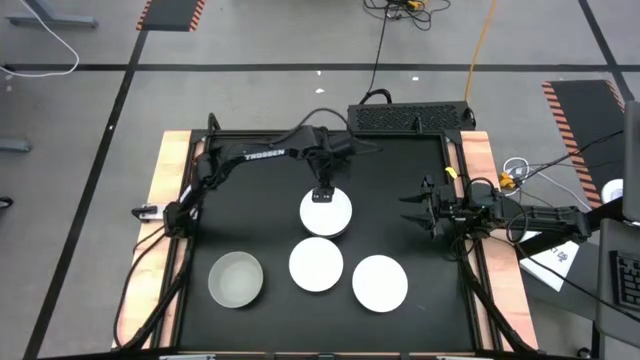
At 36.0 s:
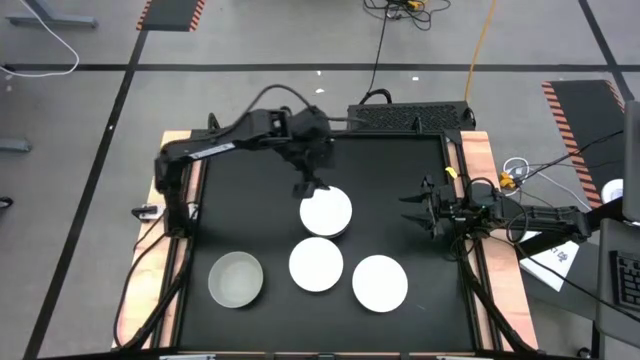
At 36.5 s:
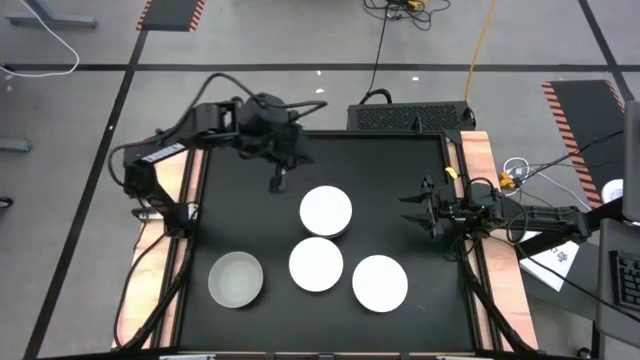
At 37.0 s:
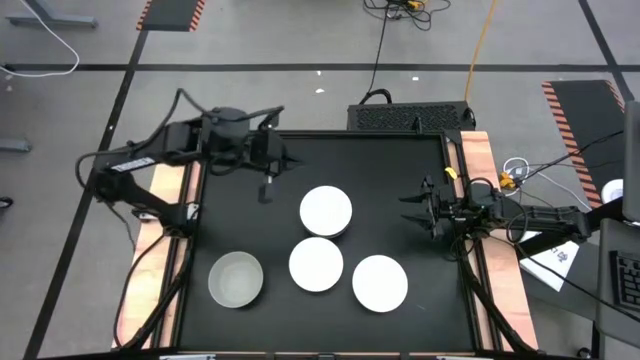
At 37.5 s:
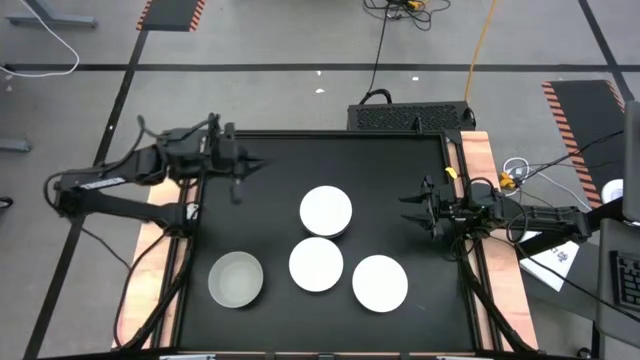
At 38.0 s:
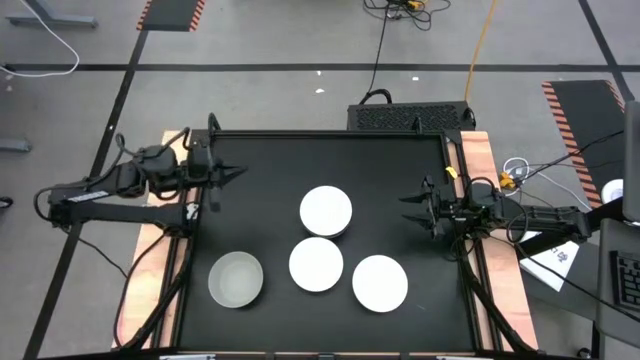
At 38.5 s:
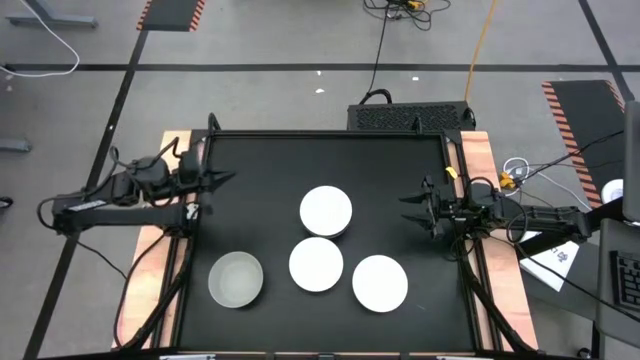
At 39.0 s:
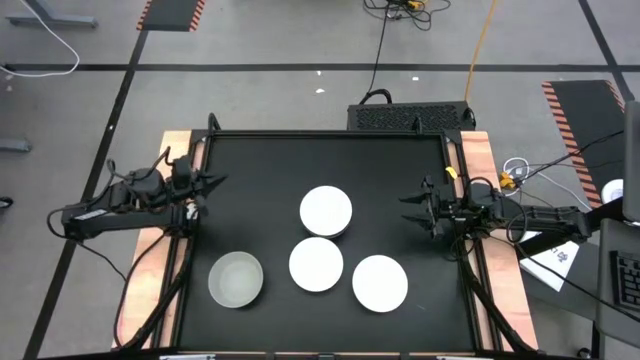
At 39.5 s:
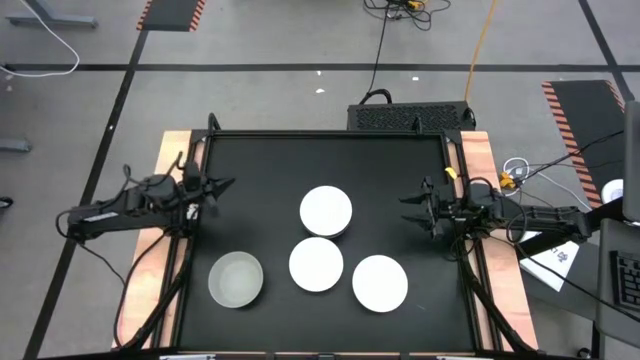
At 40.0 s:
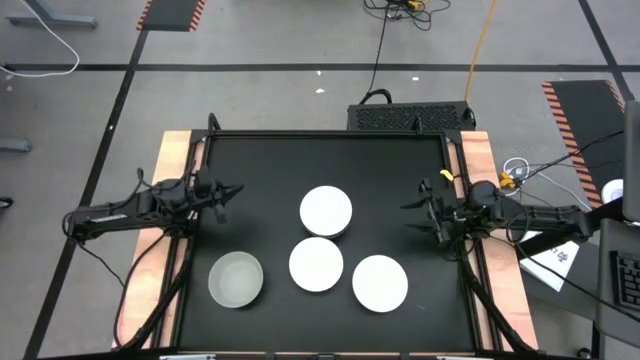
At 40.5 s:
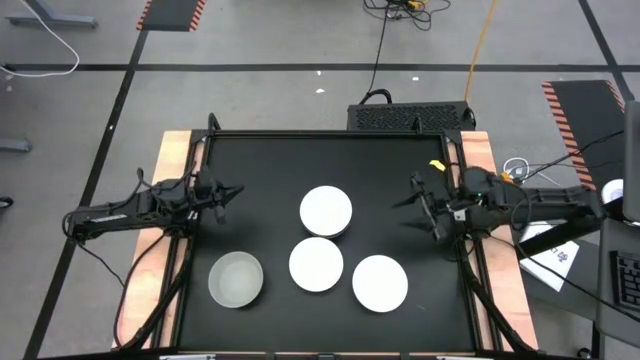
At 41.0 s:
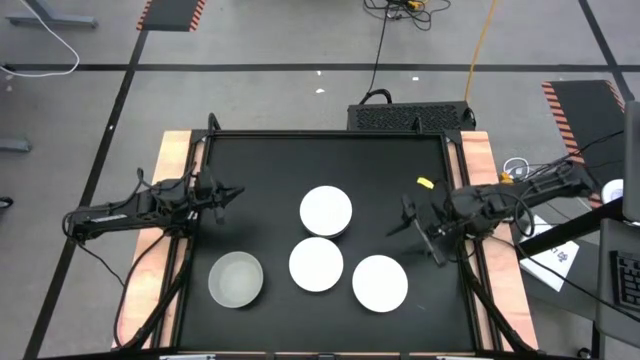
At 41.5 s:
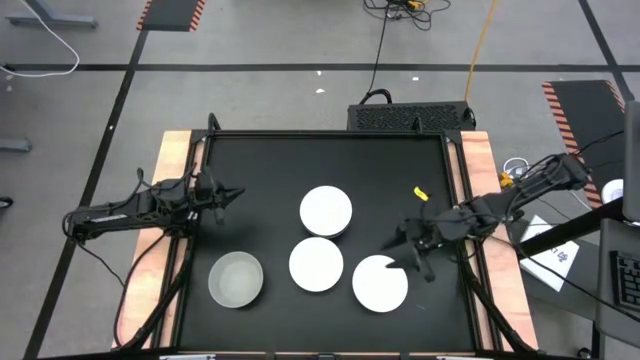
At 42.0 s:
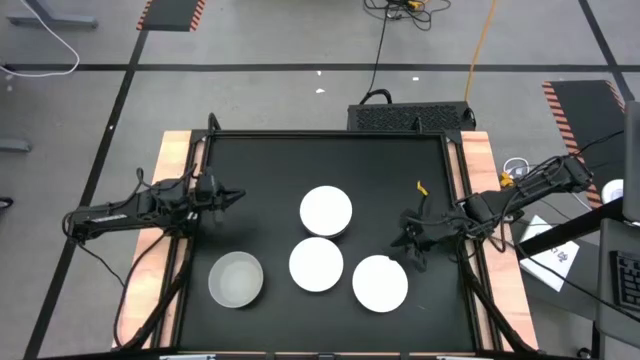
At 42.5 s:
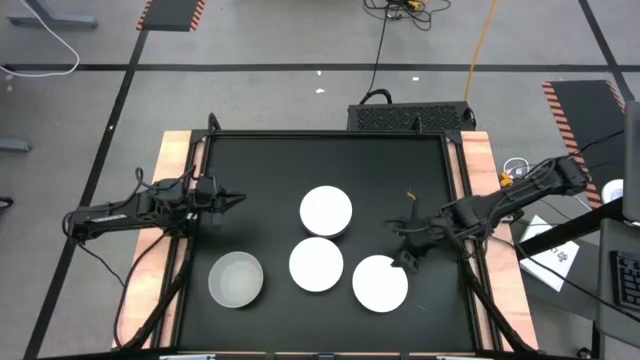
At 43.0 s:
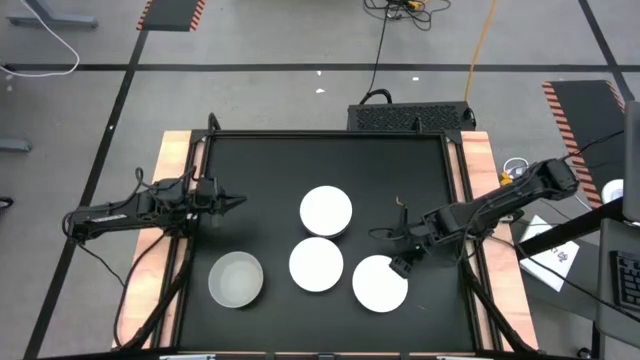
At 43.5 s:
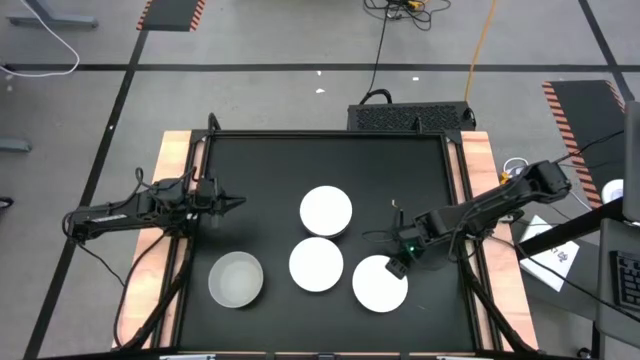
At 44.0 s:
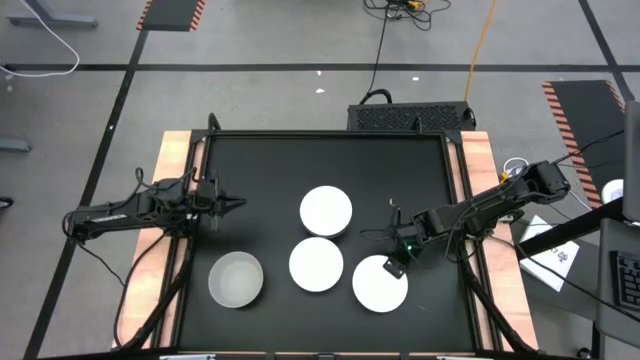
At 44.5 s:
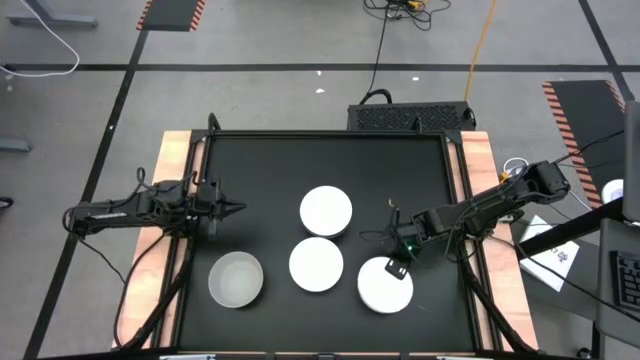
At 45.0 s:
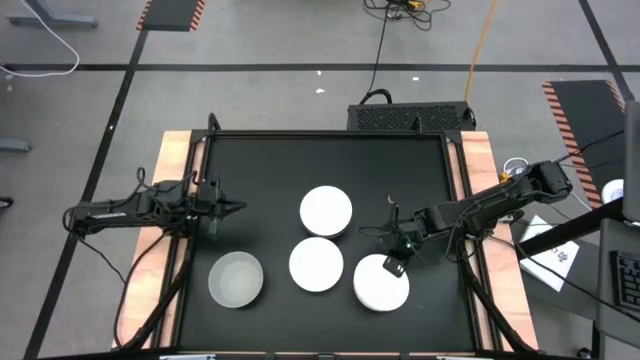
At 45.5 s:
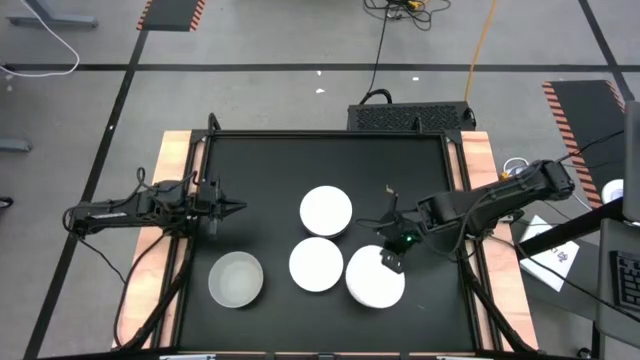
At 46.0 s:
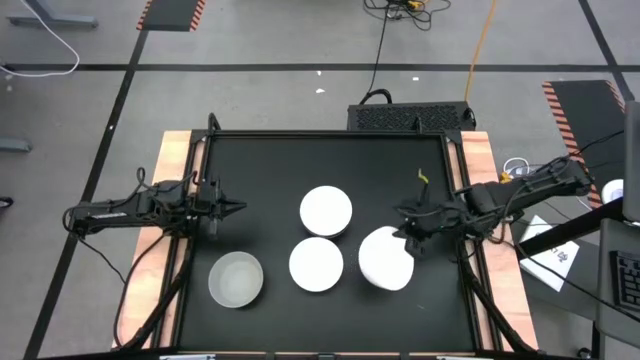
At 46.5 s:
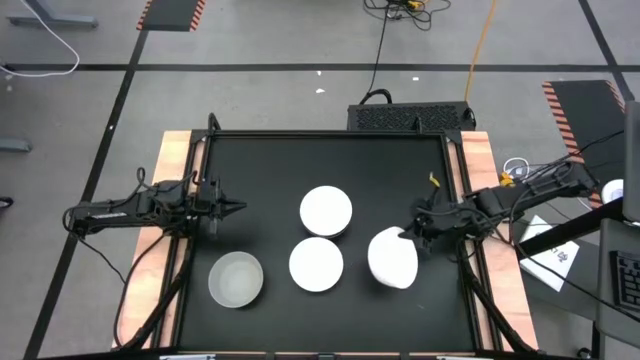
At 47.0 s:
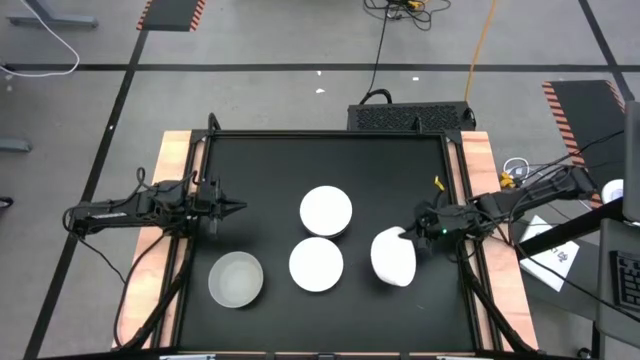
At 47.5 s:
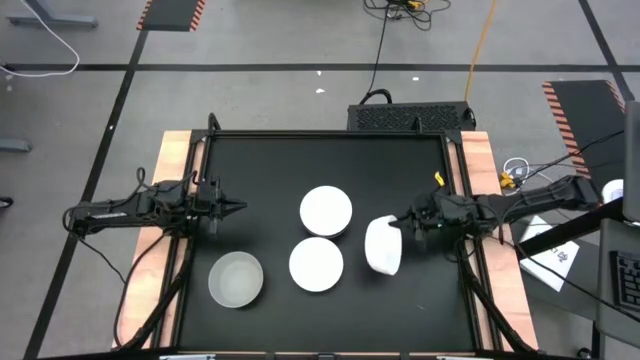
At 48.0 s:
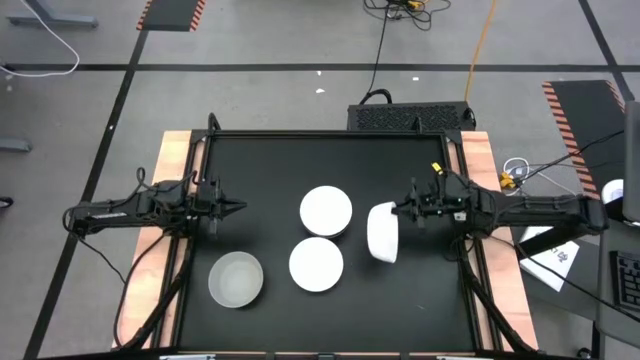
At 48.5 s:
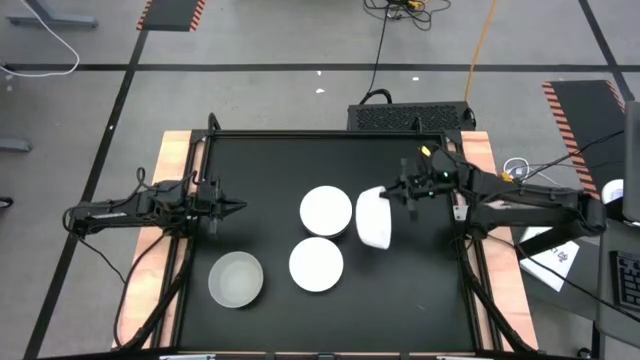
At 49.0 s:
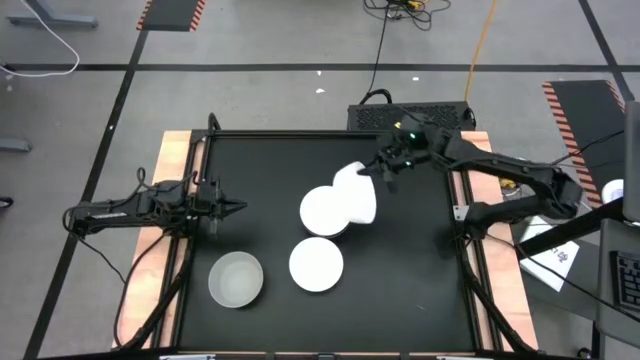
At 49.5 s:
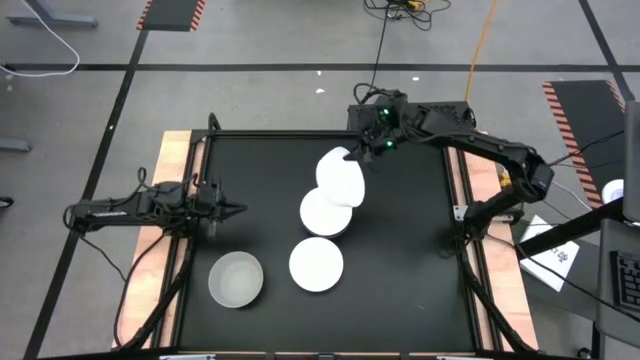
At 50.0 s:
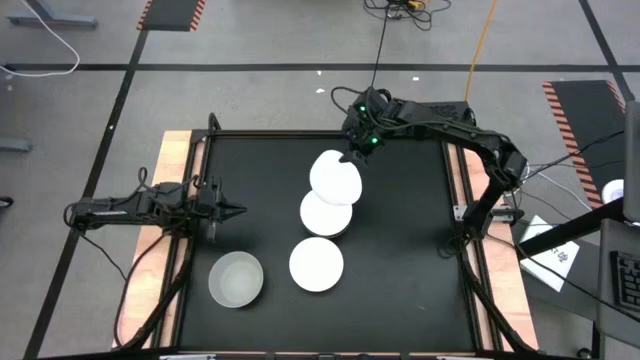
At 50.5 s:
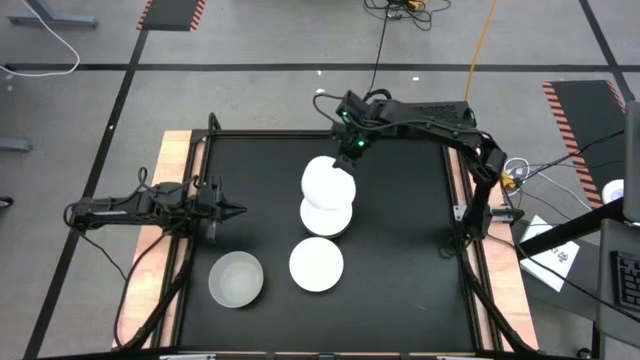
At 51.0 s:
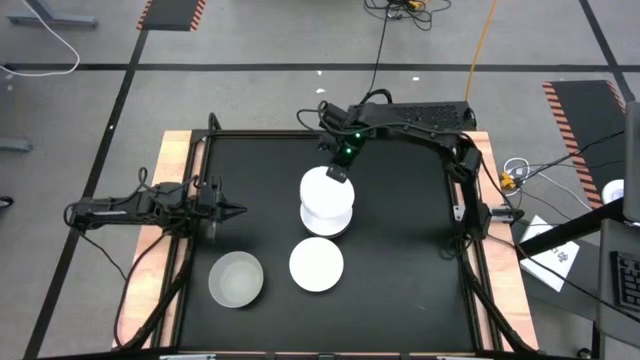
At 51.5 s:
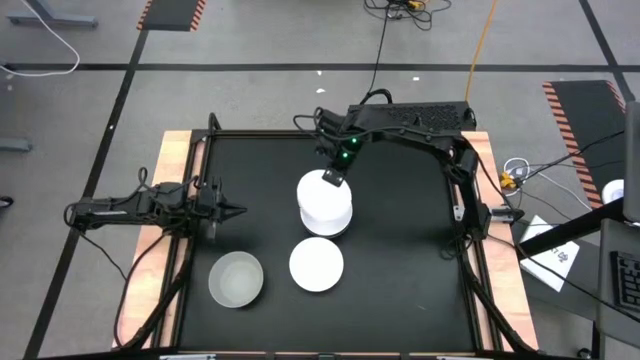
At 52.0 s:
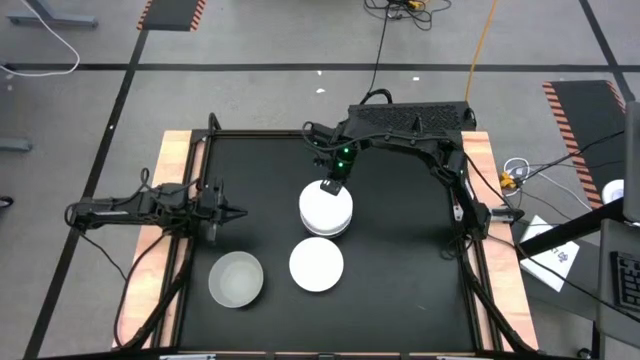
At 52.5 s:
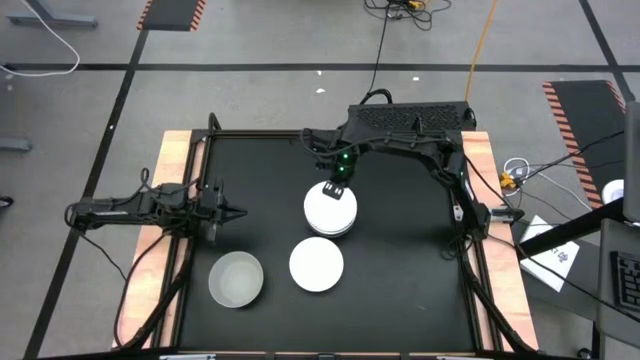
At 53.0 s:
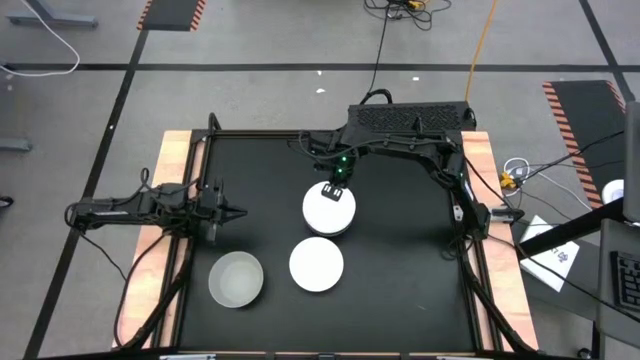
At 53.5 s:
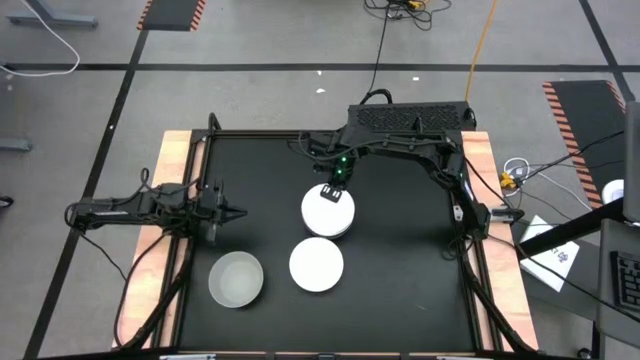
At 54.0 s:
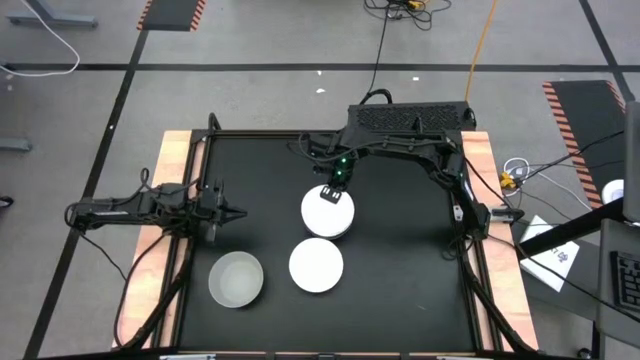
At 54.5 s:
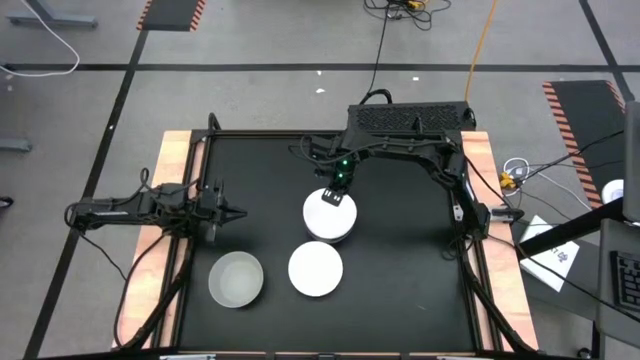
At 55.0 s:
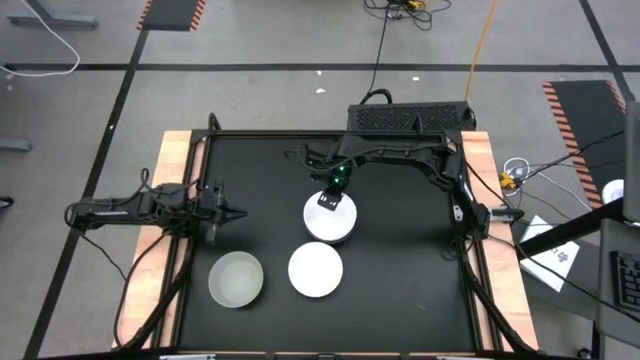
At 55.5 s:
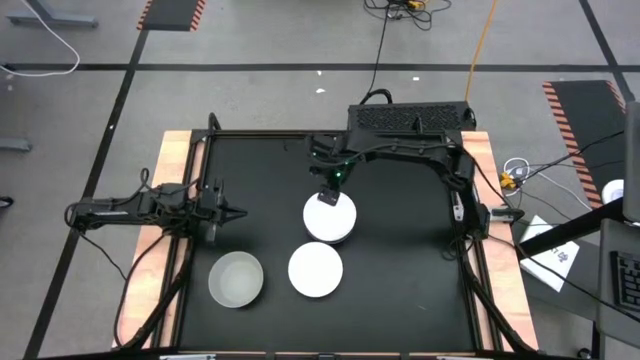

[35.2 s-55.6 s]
Task: Nest bowls inside each other
Stack the right white bowl on the white bowl

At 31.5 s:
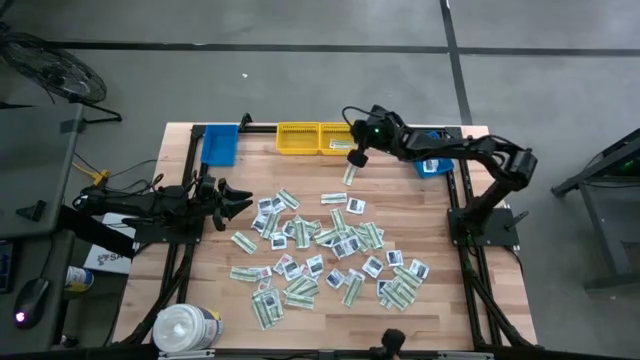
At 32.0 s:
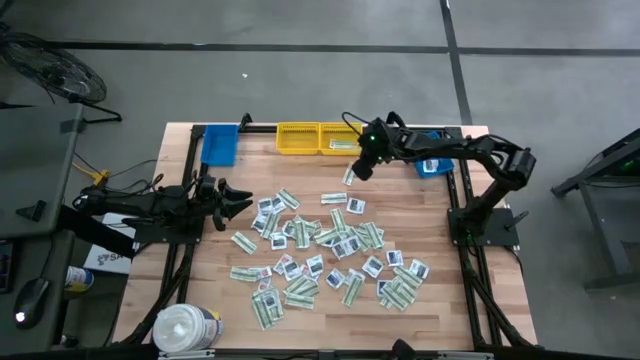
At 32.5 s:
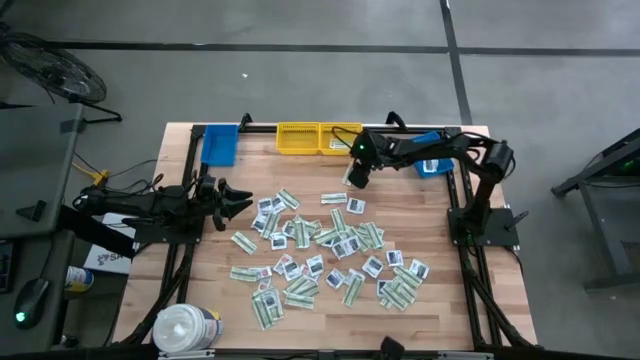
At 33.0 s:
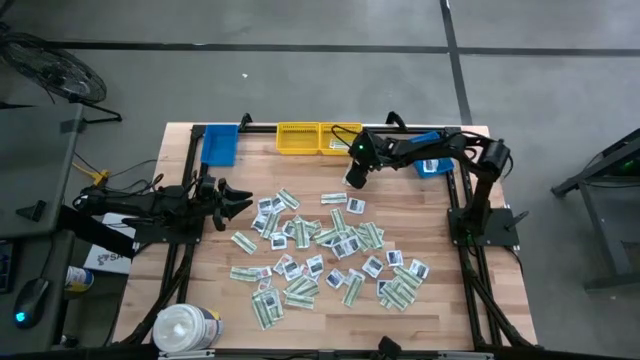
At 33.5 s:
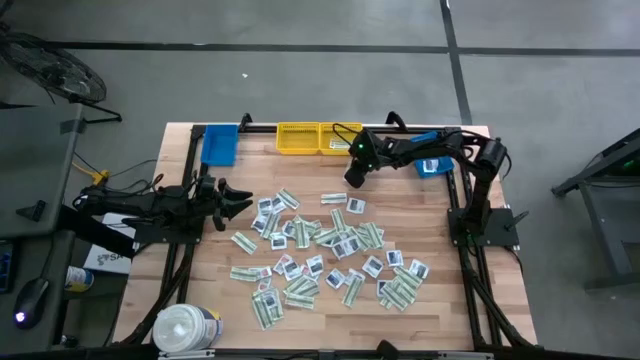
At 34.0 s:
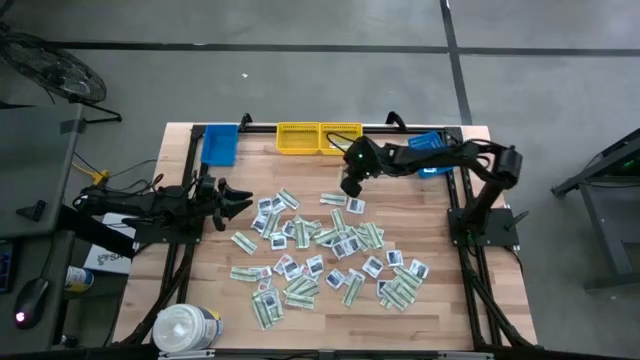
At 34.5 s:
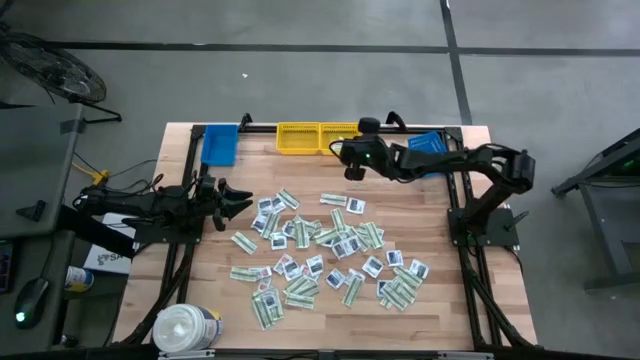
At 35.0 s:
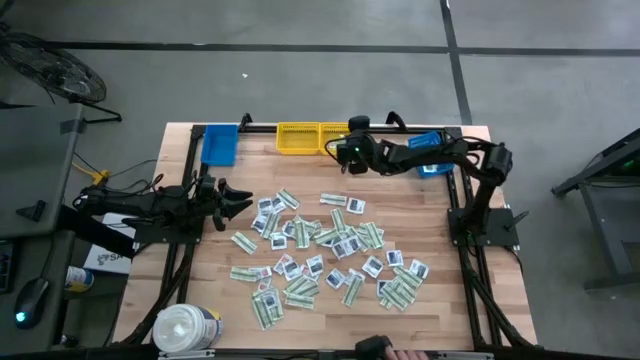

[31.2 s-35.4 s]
Task: Pick & Place First Aid Supplies
Put the green bandage pack into the right yellow bin
